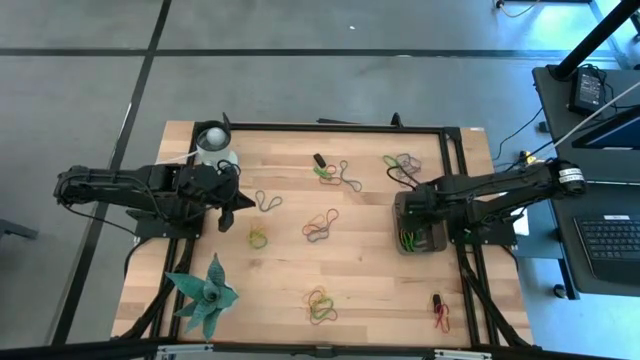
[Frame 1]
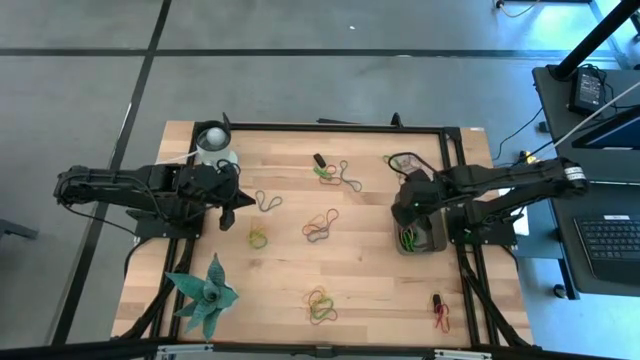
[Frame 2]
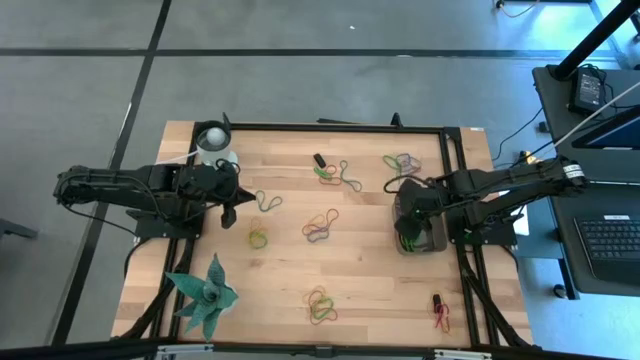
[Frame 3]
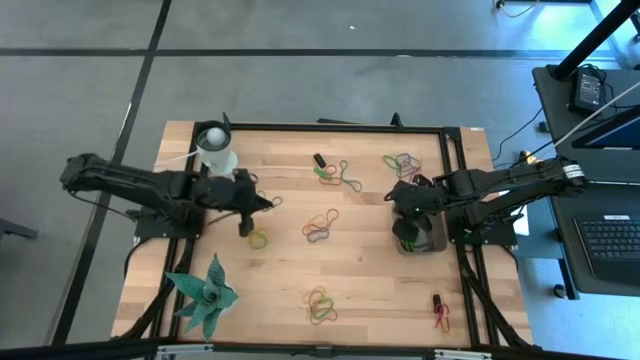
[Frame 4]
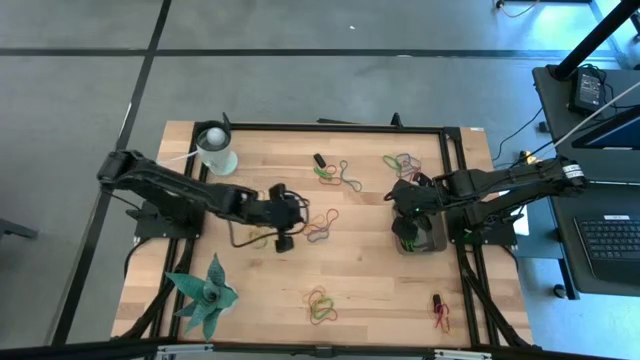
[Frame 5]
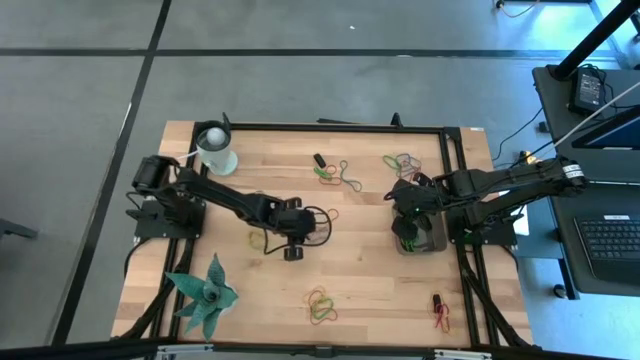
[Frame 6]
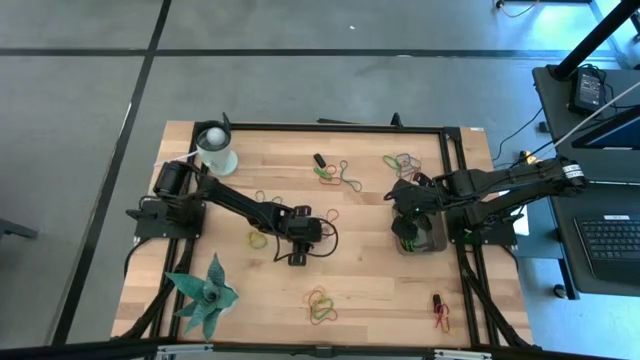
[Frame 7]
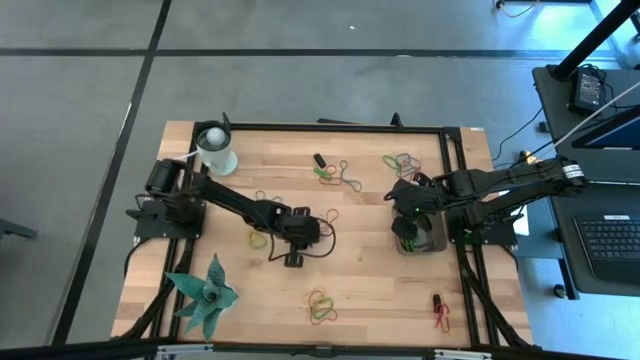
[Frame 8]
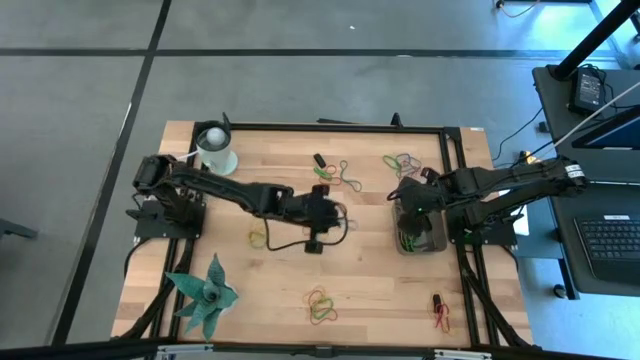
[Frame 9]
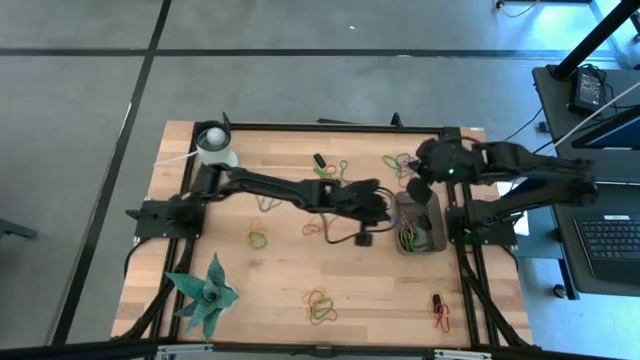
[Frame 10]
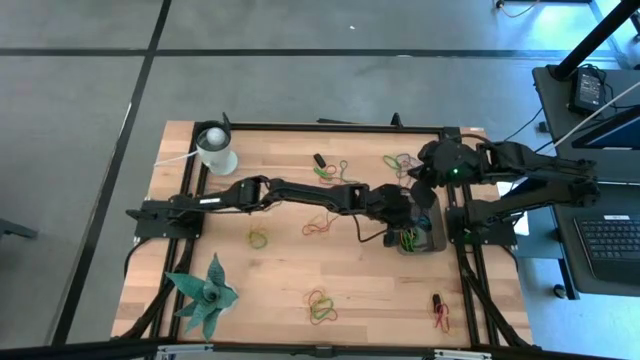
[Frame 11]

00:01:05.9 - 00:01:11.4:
Task: Pick and place rubber bands into bin
Put the blue rubber band into the black bin

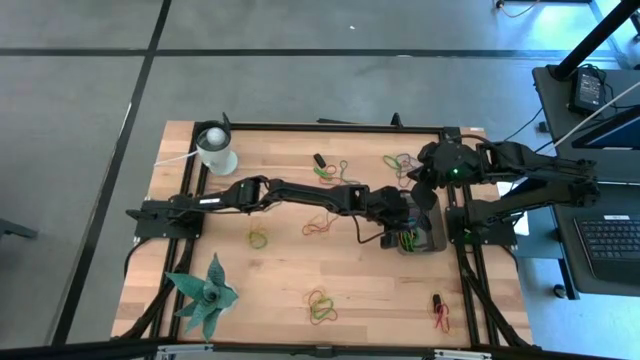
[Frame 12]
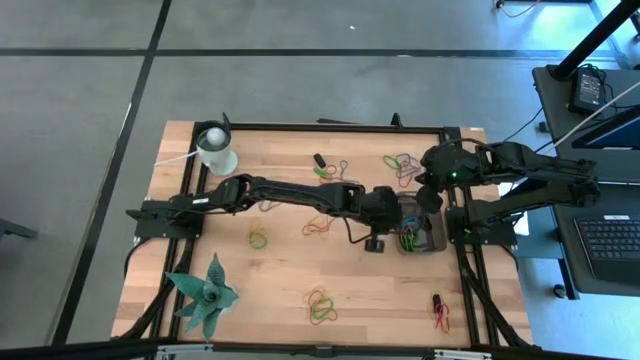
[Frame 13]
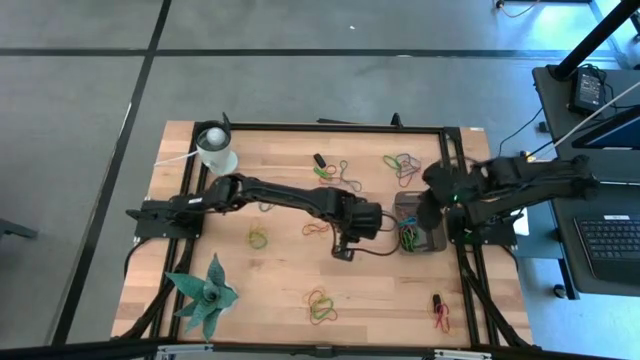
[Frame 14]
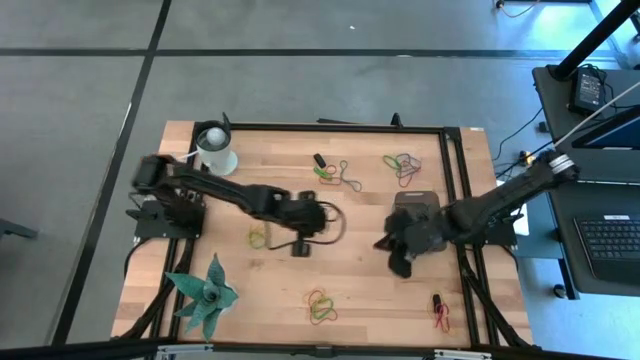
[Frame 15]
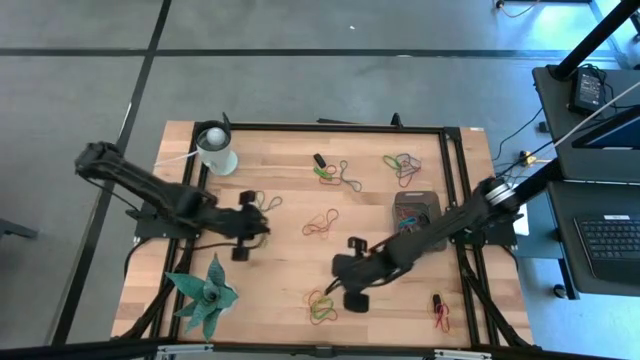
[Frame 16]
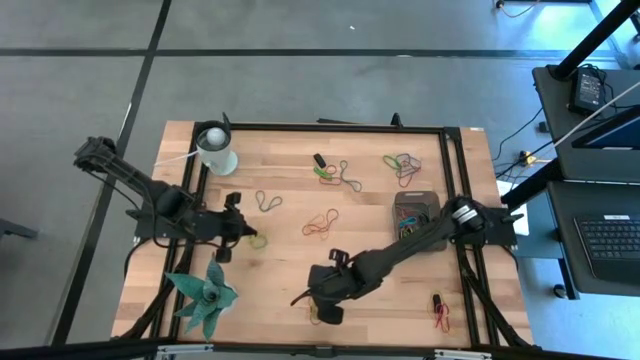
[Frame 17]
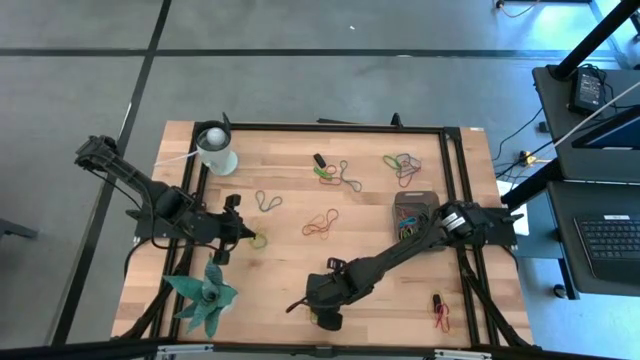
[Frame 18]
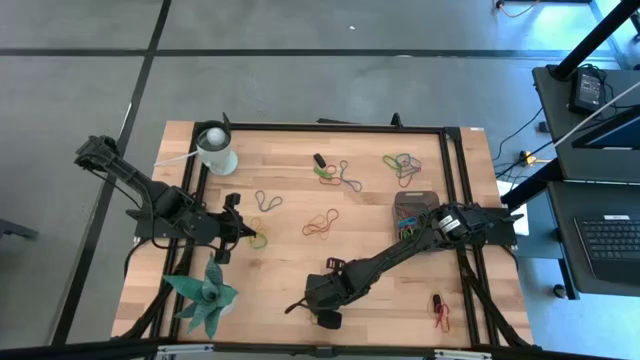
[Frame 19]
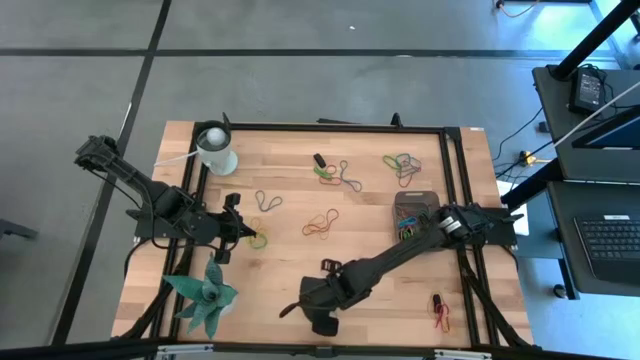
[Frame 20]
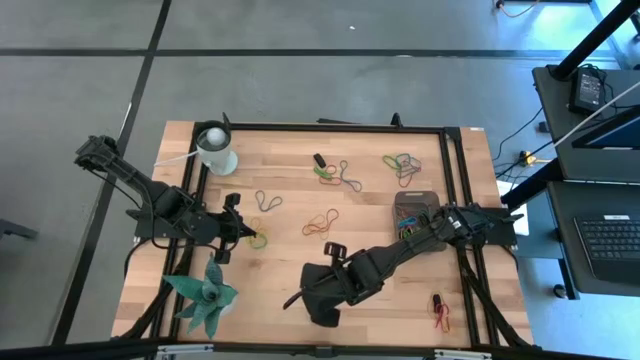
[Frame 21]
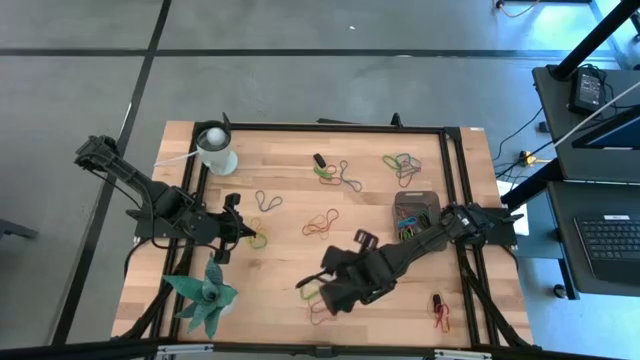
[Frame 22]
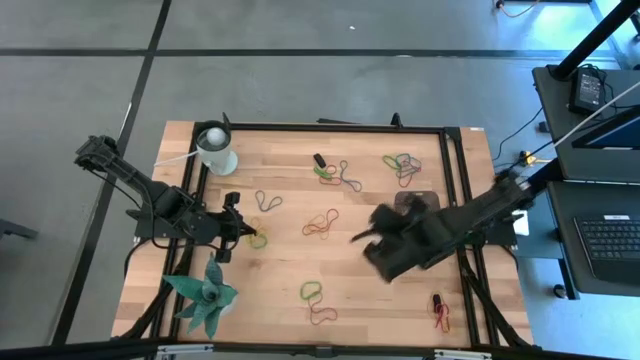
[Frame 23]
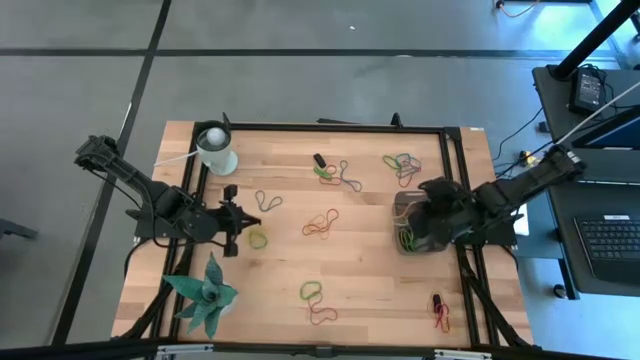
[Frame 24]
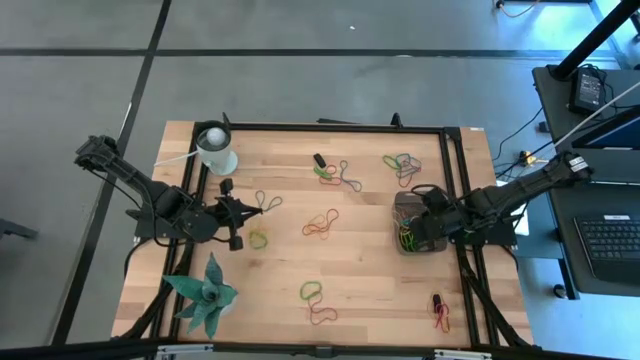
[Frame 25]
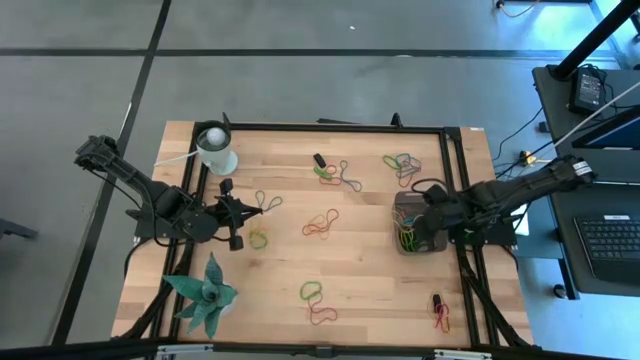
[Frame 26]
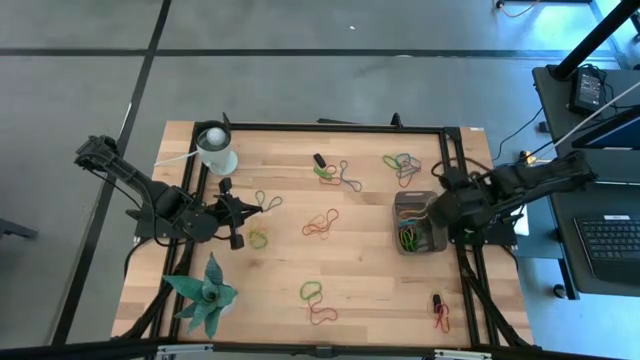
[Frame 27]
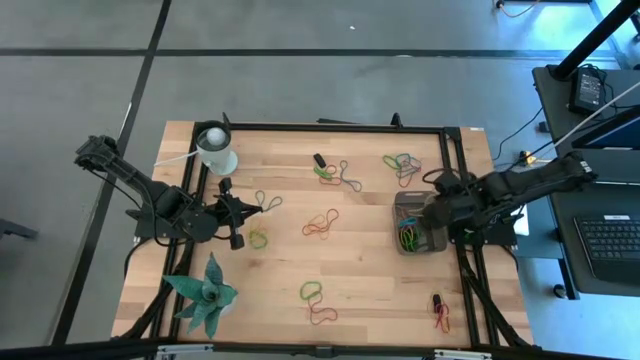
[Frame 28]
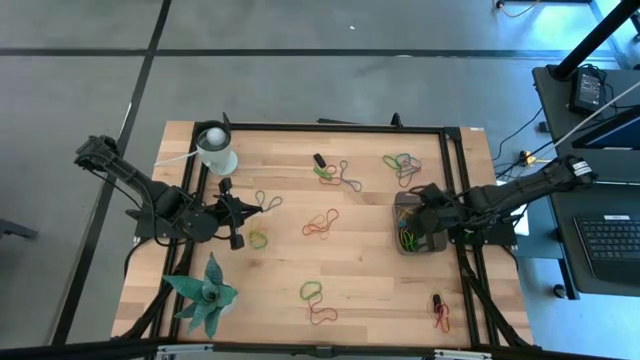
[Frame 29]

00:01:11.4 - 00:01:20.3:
Put the yellow rubber band into the black bin

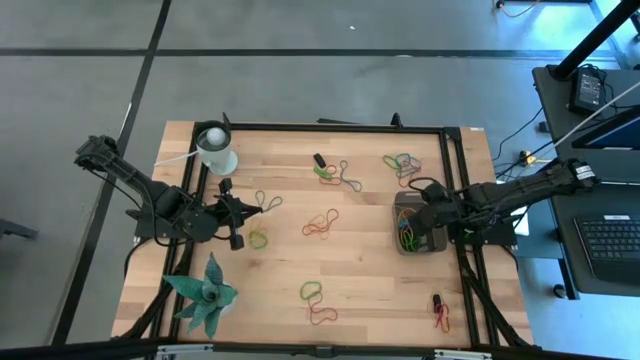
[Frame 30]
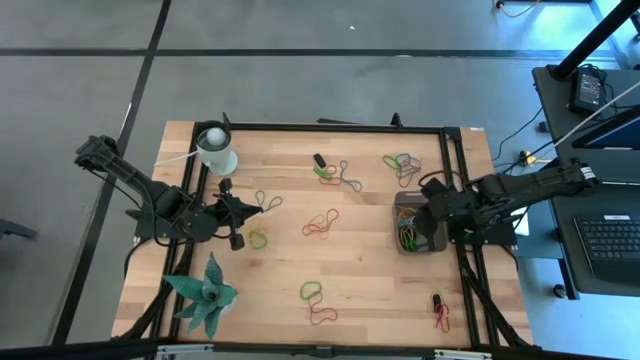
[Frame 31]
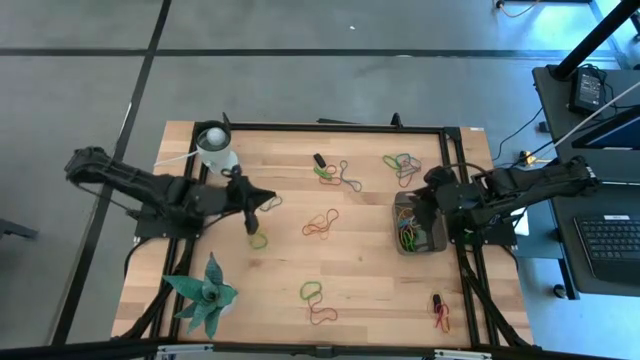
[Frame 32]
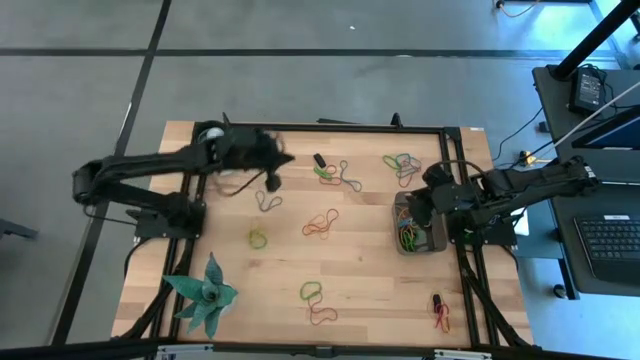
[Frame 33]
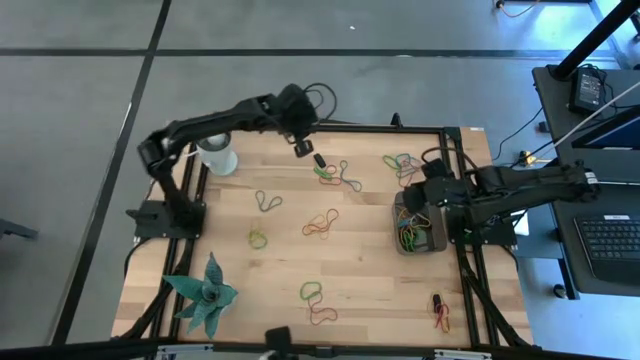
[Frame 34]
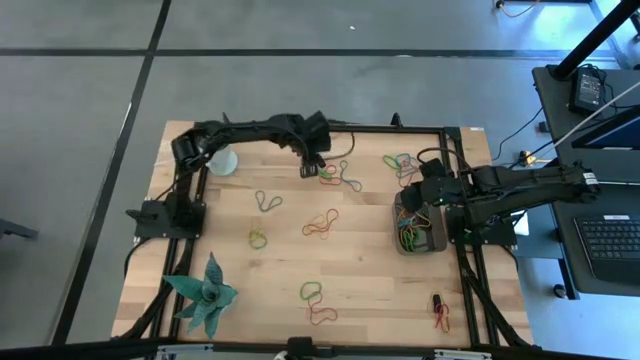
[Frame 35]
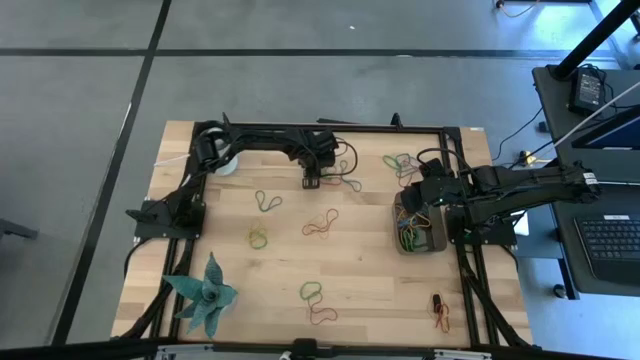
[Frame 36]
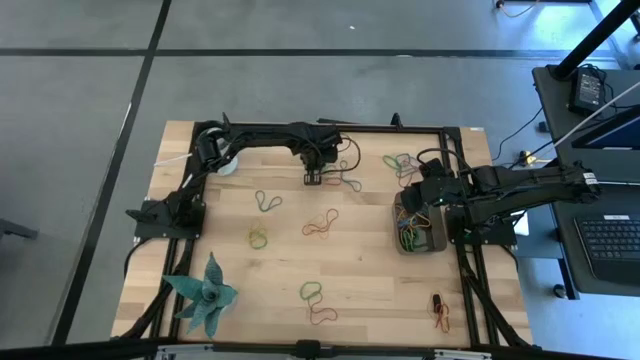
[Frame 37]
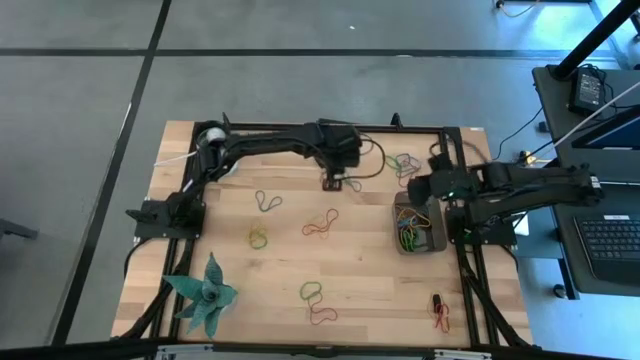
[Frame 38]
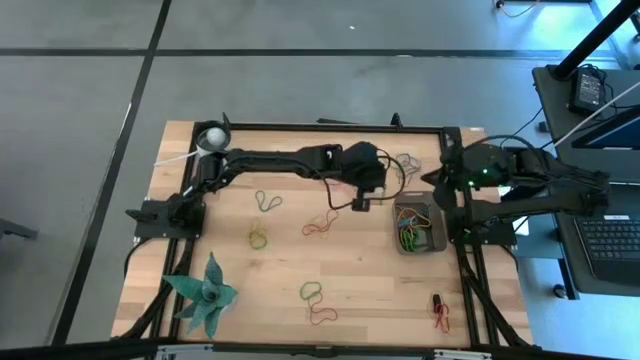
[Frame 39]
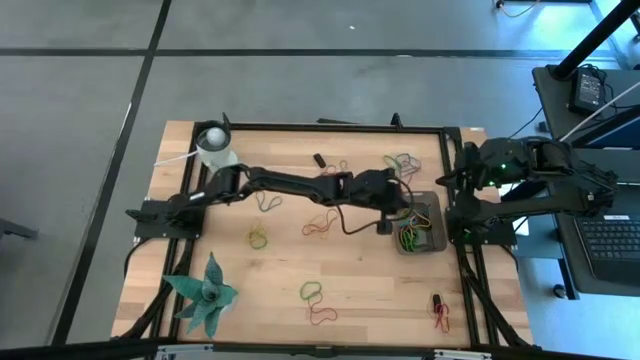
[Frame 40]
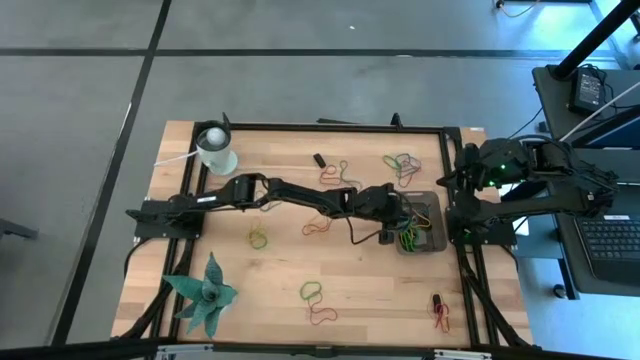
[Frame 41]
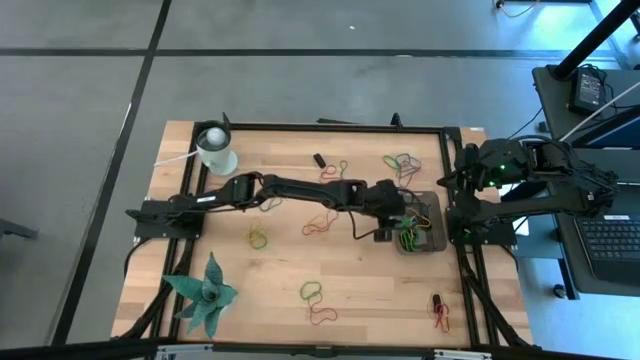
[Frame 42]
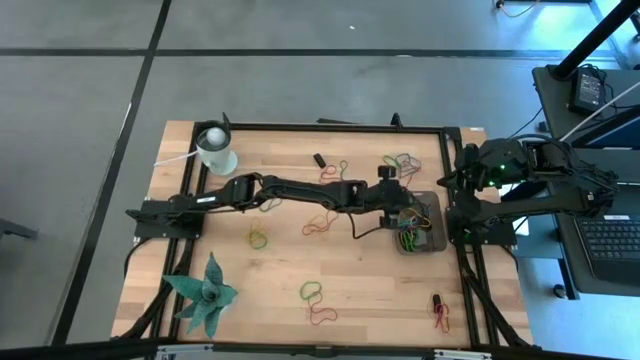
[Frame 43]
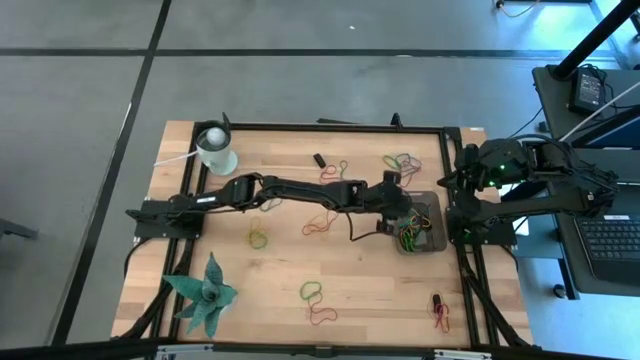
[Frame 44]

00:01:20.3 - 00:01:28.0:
Put the green rubber band into the black bin
